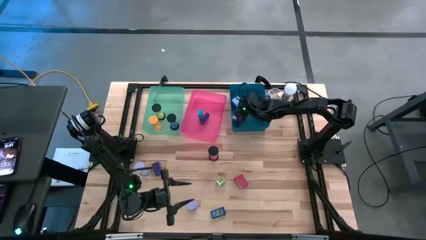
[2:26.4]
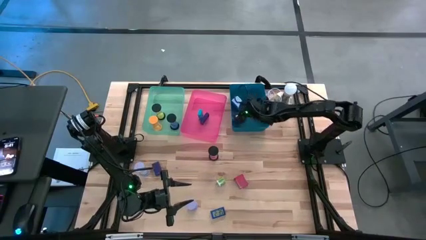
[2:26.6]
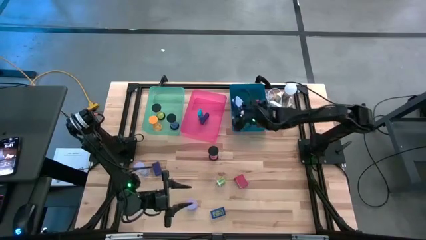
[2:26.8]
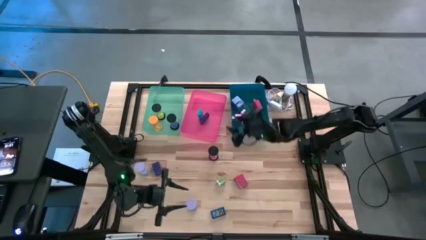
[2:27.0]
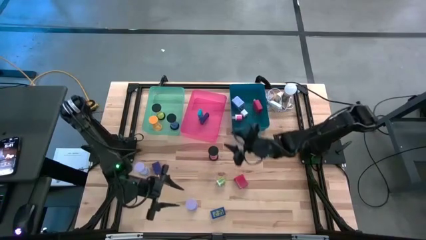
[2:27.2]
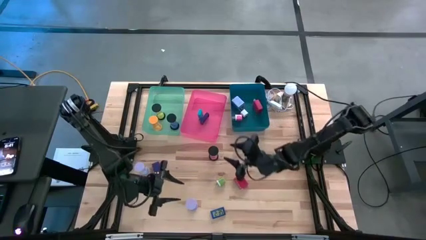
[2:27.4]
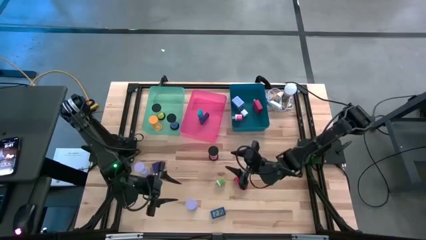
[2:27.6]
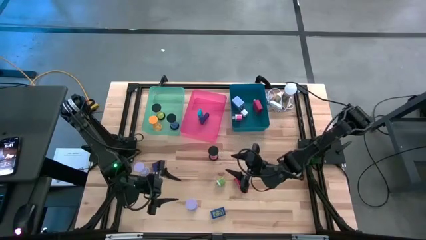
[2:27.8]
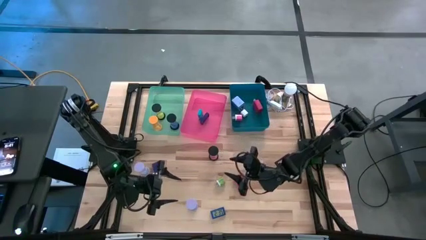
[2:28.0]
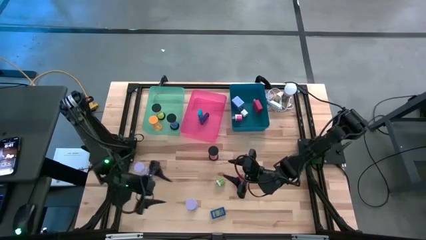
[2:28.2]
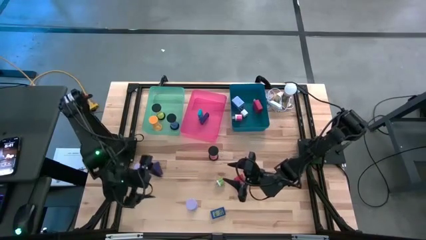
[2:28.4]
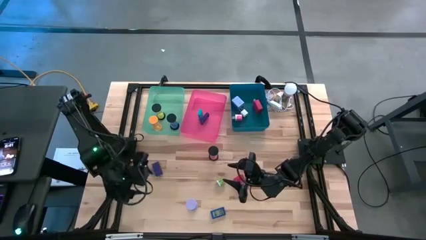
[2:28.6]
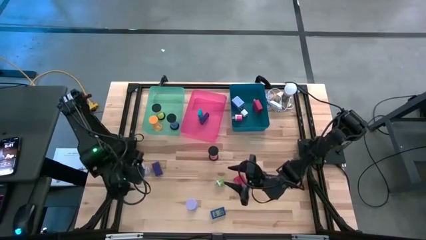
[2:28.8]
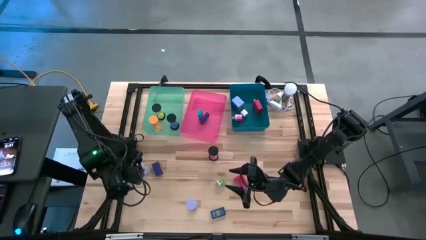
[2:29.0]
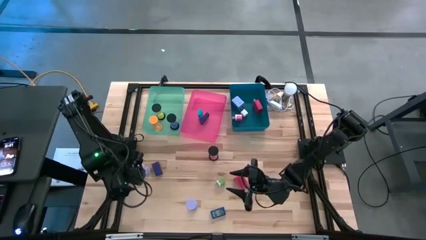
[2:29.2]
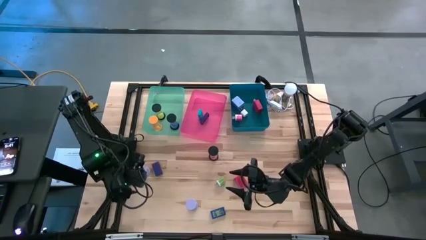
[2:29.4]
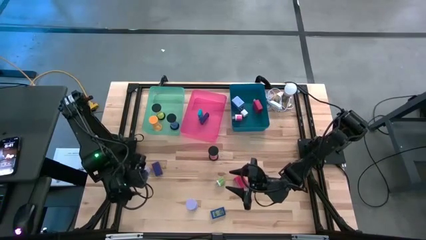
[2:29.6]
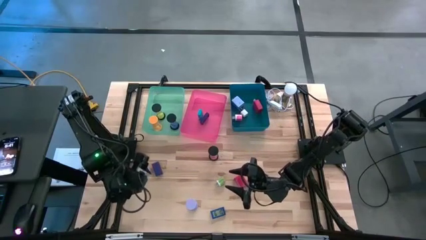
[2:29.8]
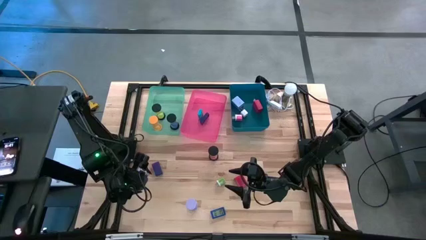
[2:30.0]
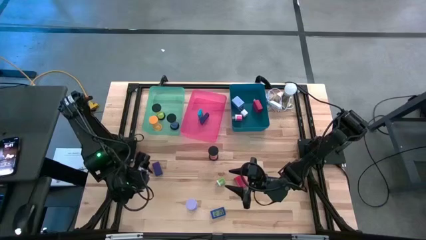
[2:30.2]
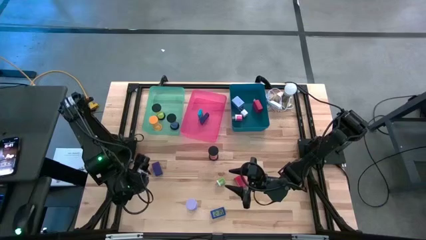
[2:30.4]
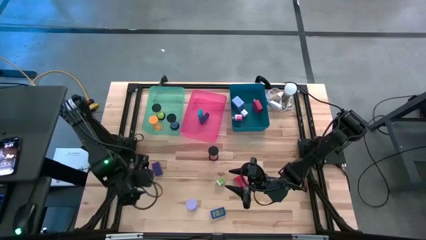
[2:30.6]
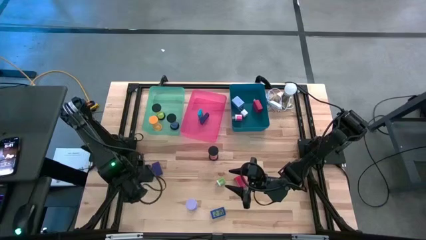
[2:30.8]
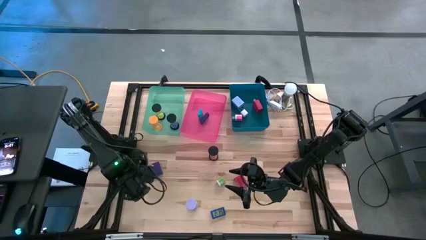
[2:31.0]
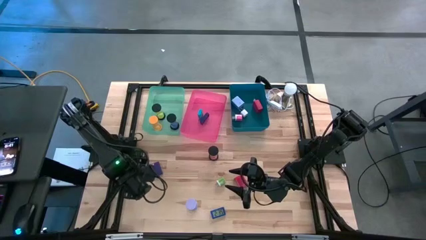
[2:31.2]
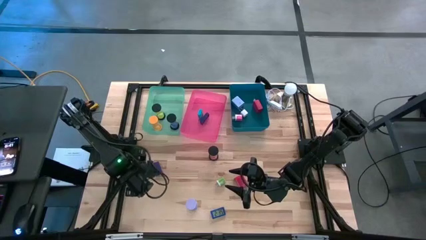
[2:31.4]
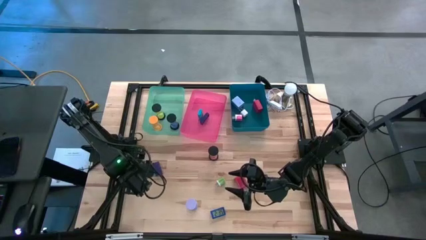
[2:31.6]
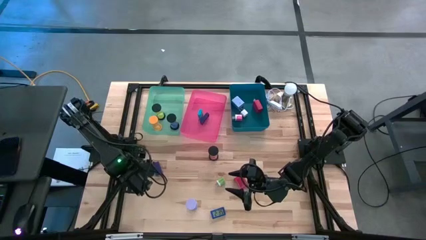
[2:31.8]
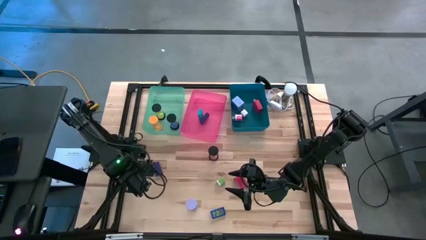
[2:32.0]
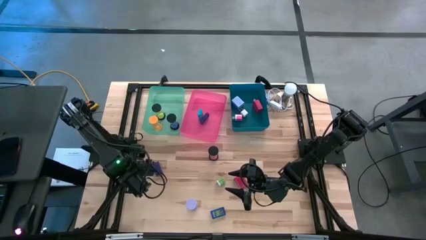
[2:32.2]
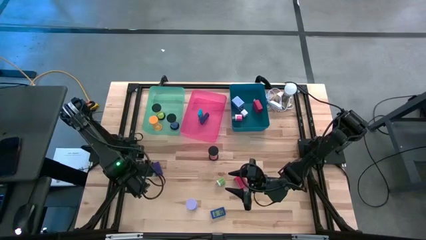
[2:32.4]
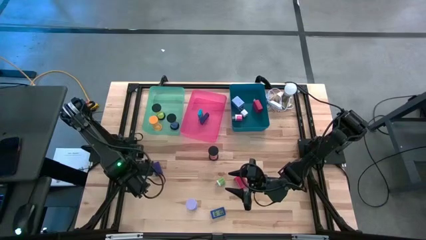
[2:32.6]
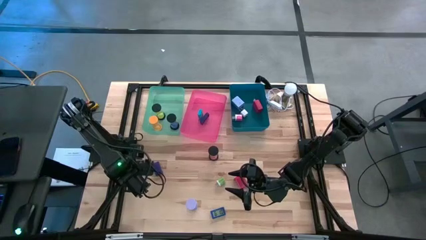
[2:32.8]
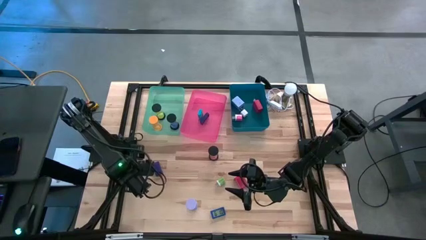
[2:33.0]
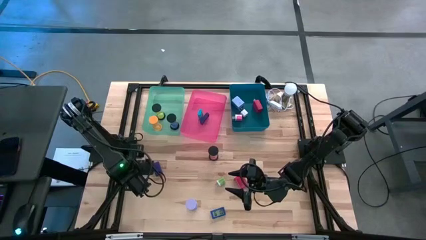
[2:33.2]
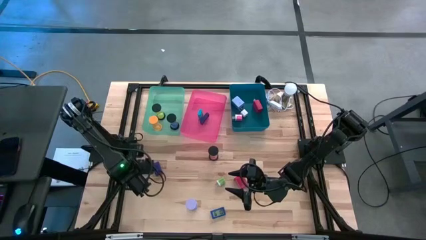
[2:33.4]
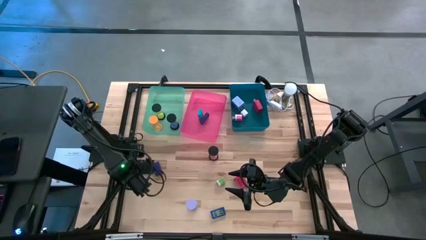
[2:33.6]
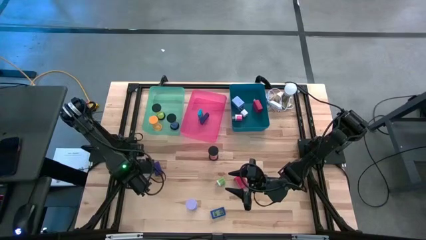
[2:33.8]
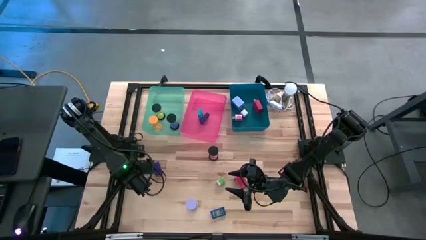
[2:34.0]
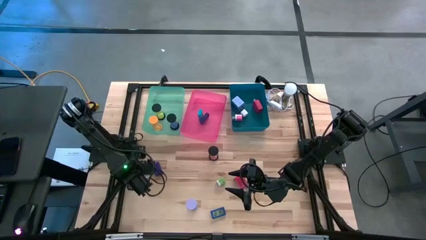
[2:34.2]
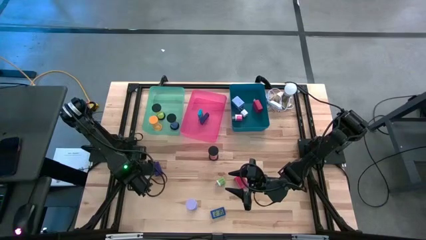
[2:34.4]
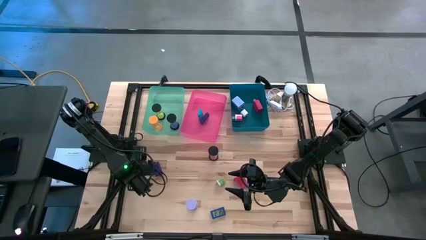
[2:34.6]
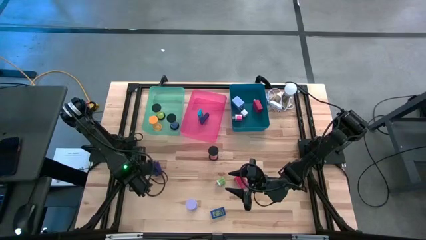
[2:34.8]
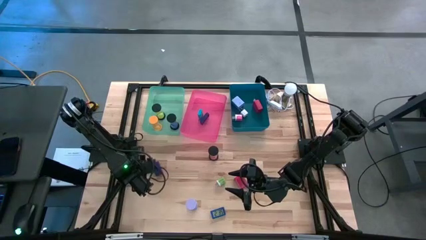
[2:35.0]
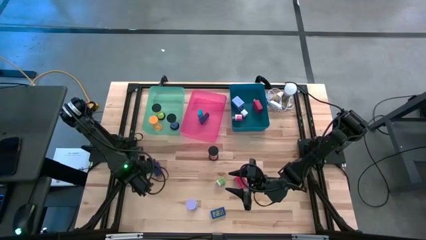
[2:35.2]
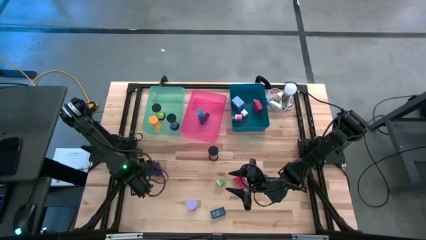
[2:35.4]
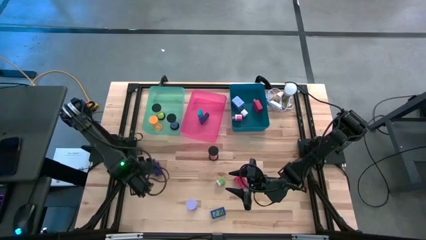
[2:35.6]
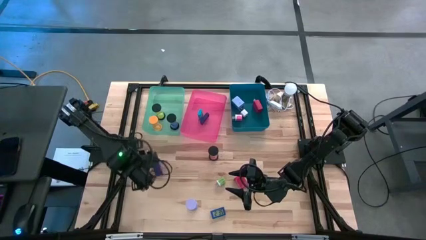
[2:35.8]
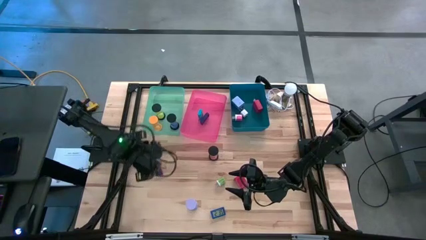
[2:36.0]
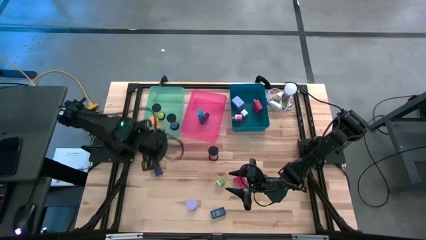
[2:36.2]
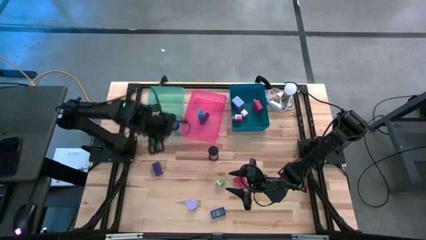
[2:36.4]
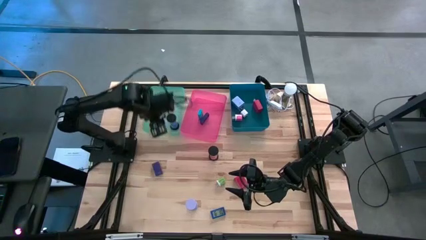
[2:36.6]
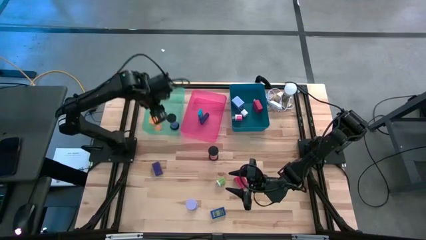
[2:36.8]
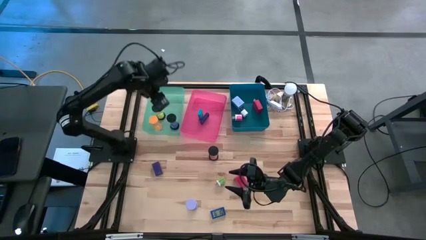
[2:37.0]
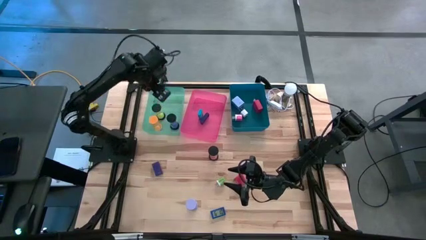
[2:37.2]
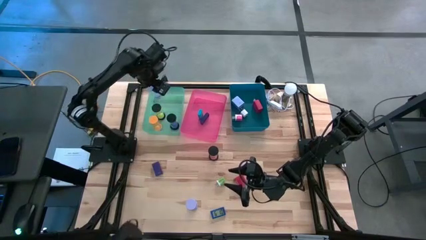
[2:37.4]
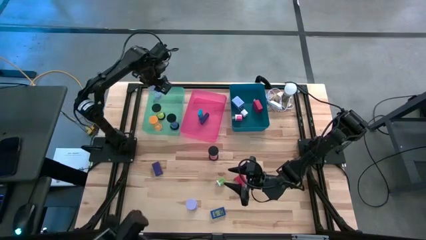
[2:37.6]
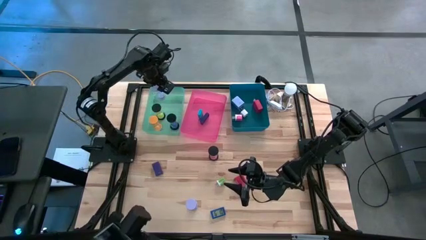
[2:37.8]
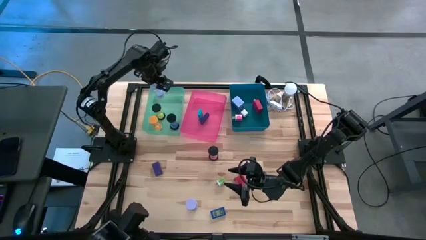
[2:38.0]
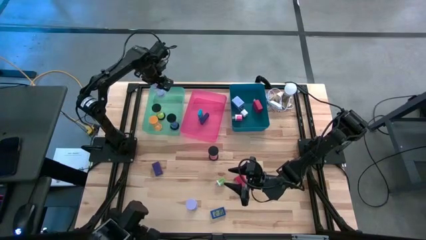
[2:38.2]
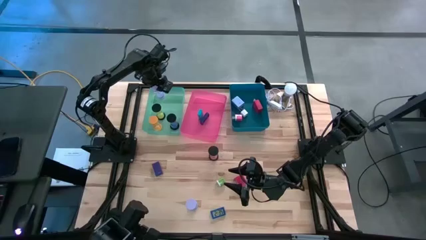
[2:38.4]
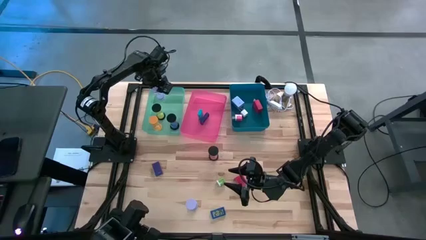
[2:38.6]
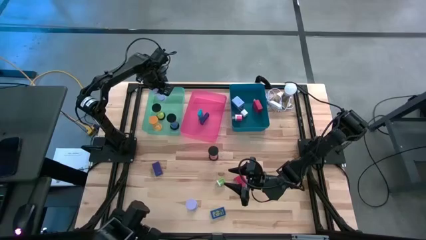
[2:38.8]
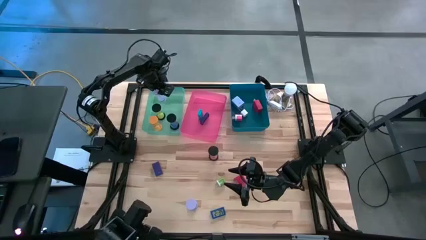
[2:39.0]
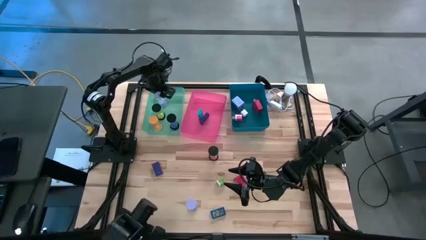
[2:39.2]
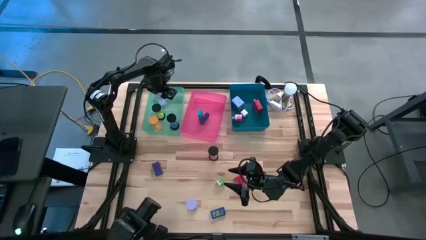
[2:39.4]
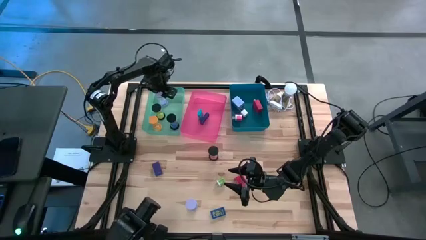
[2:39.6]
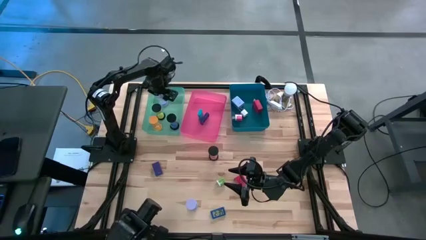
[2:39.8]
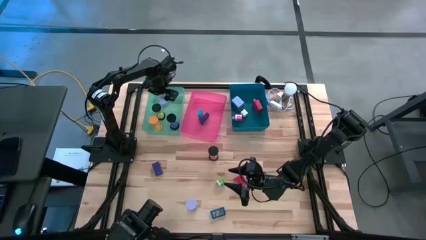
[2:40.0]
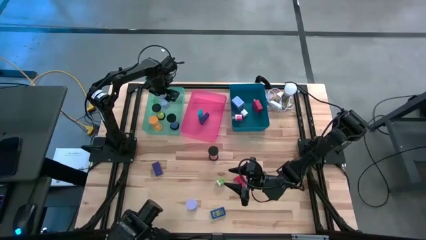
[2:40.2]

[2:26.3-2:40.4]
Task: Pick & Place Office items
Put the top light purple hourglass into the green bin

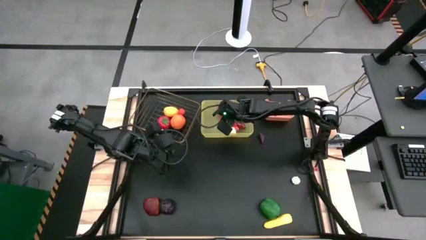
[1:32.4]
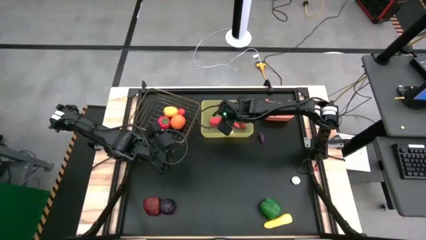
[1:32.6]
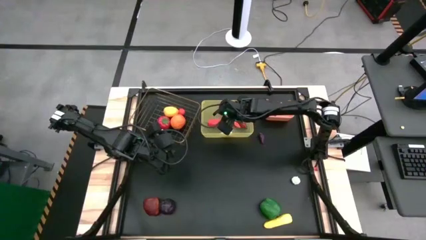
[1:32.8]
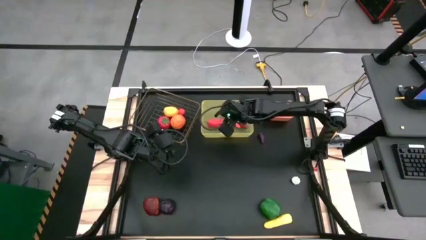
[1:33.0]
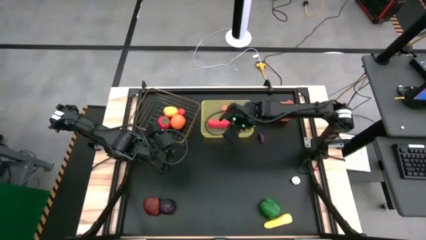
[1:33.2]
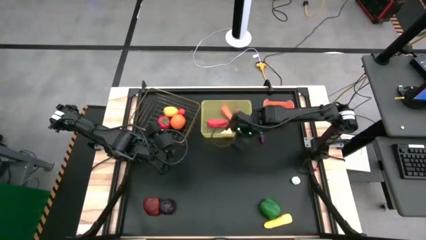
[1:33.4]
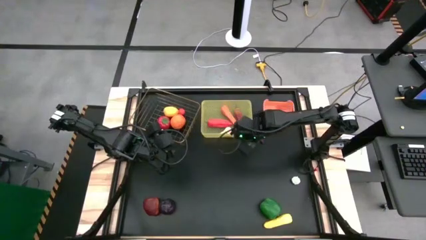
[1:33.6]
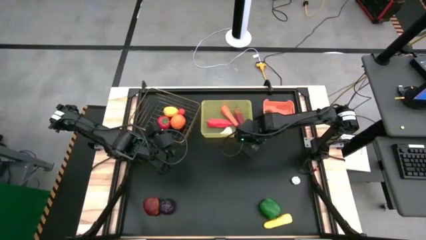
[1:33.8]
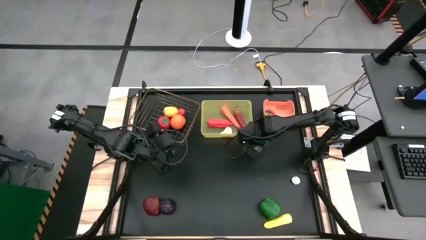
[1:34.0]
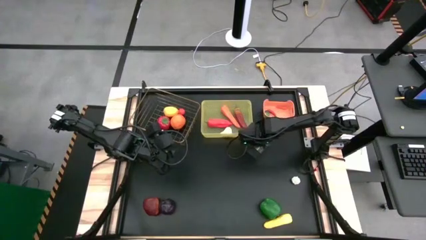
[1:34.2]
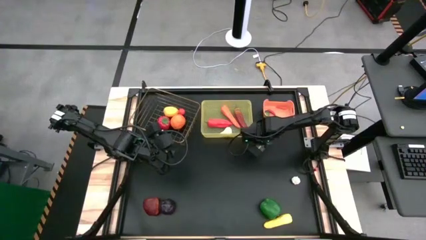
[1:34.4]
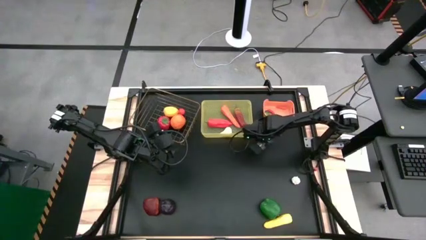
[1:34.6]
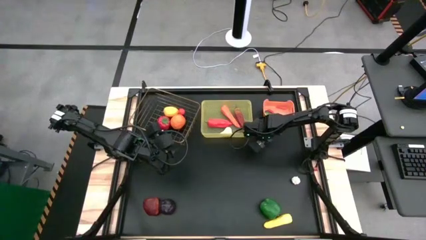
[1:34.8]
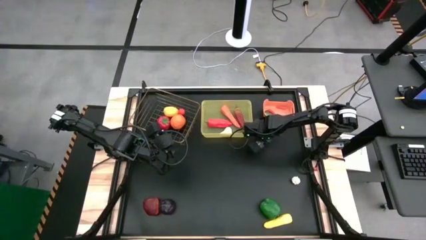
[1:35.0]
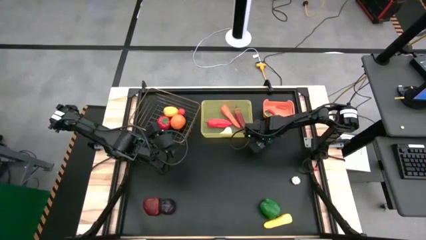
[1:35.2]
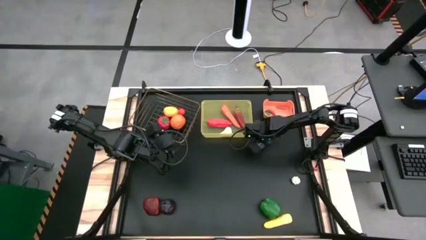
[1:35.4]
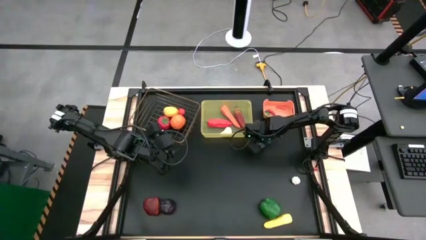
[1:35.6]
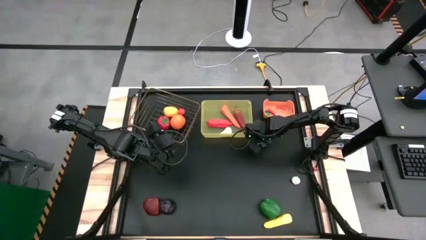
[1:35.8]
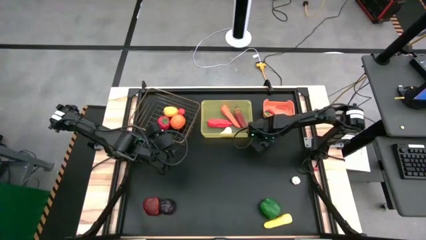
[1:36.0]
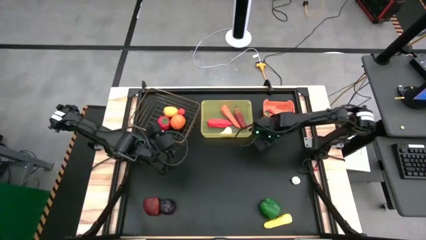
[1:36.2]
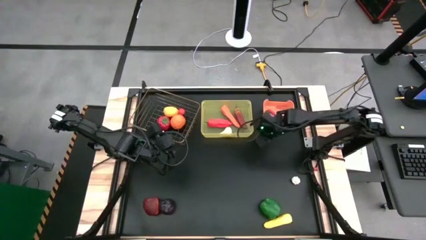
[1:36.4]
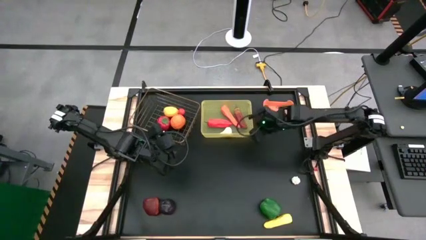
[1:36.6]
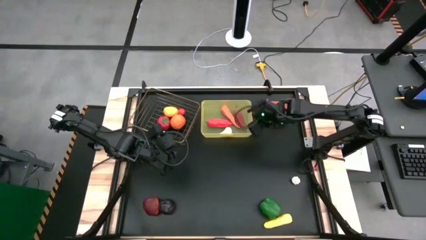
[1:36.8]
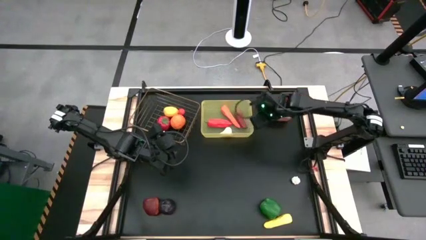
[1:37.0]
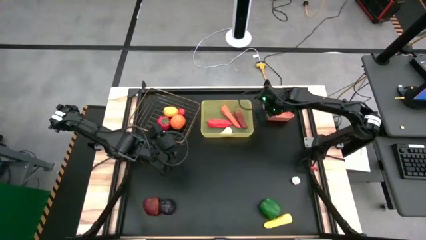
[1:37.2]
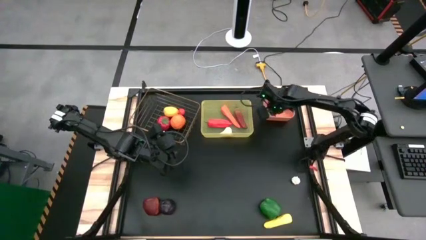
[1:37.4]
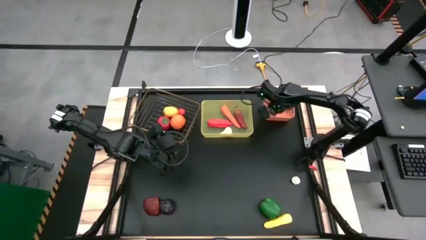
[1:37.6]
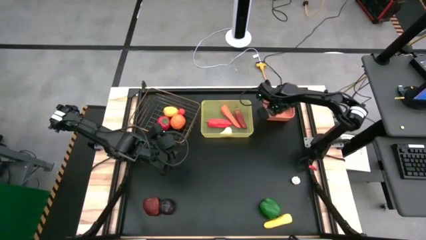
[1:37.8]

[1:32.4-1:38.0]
Task: Sort produce into baskets
Put the eggplant into the orange bin
